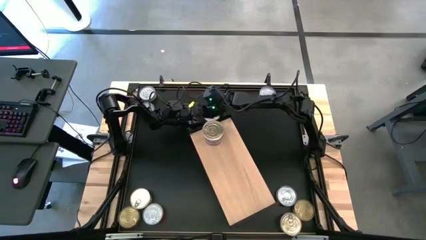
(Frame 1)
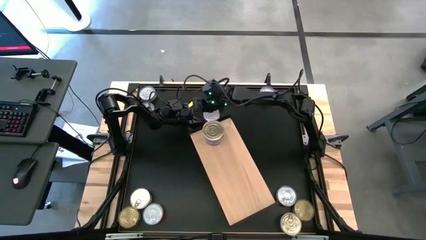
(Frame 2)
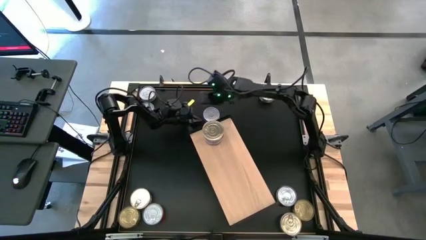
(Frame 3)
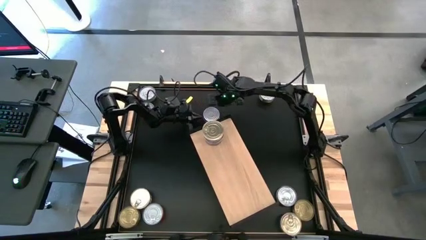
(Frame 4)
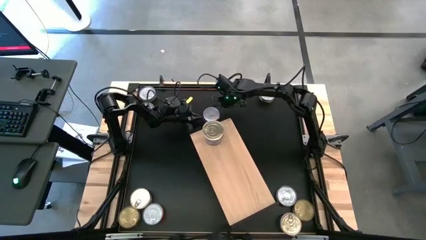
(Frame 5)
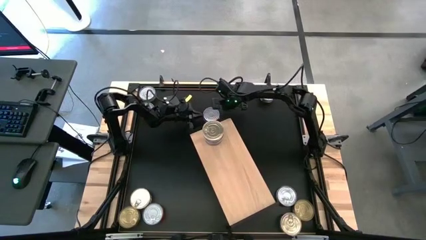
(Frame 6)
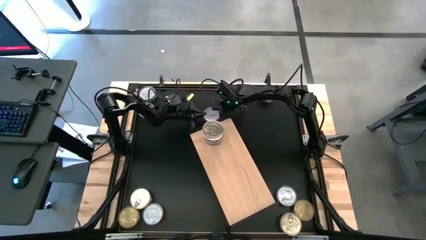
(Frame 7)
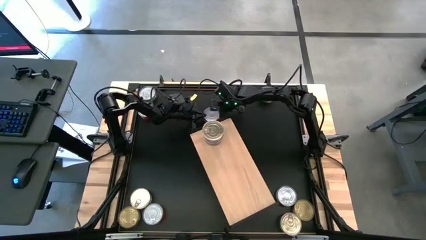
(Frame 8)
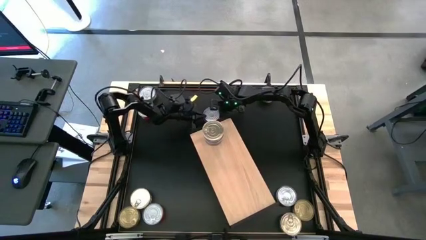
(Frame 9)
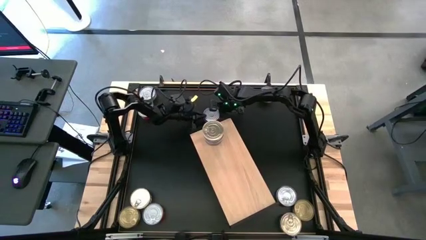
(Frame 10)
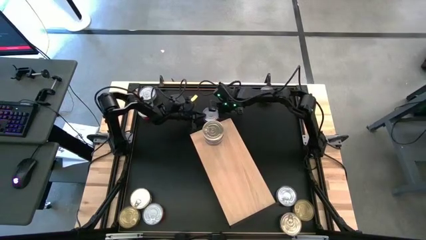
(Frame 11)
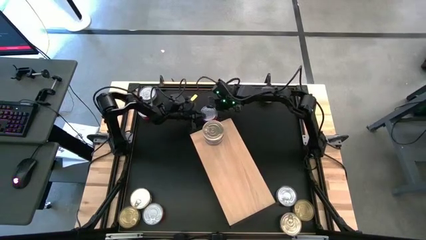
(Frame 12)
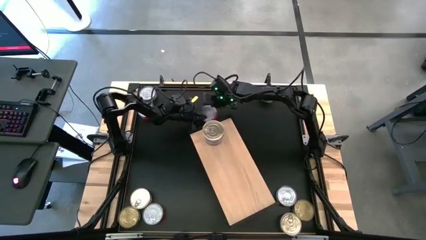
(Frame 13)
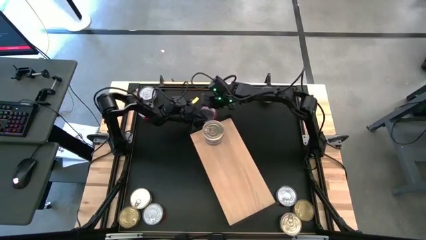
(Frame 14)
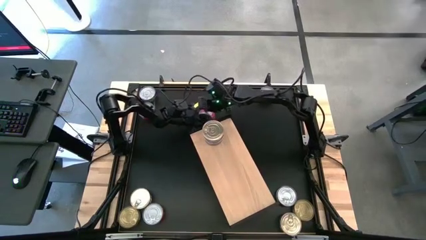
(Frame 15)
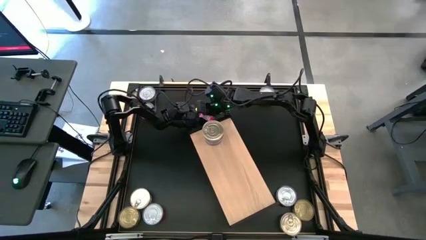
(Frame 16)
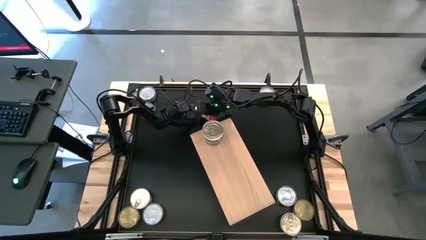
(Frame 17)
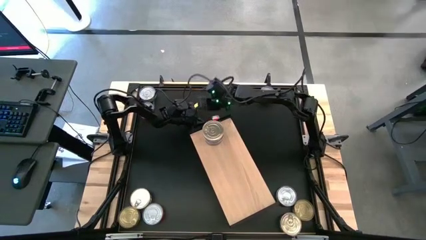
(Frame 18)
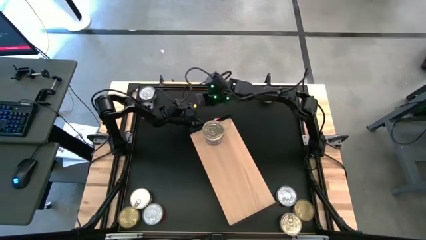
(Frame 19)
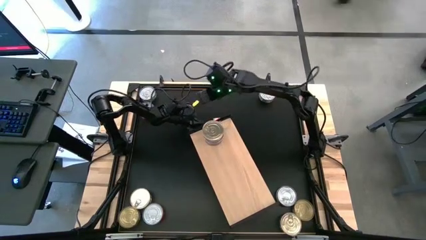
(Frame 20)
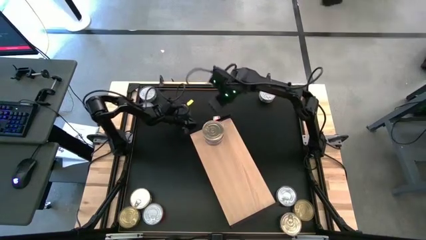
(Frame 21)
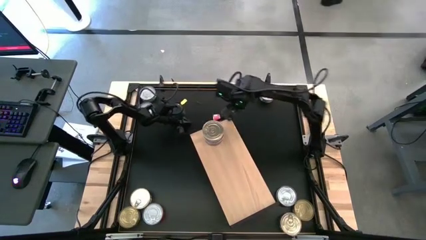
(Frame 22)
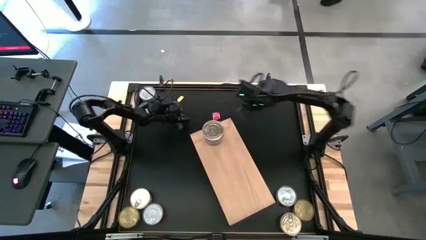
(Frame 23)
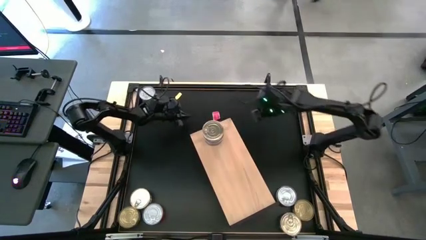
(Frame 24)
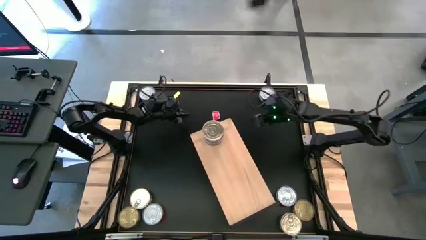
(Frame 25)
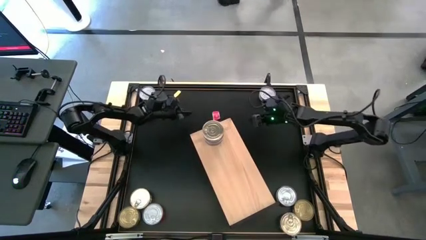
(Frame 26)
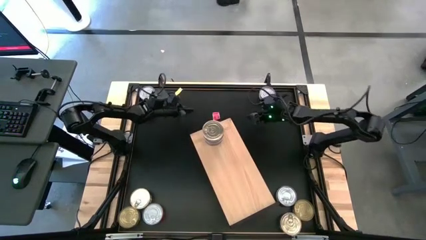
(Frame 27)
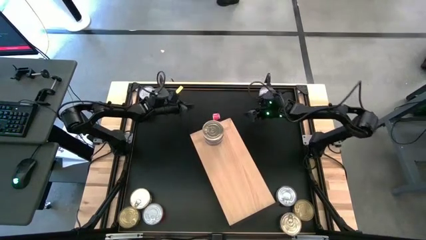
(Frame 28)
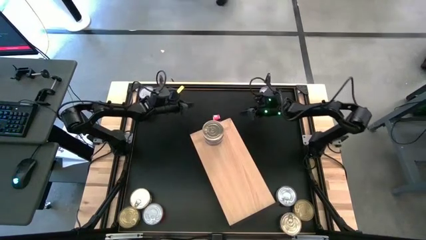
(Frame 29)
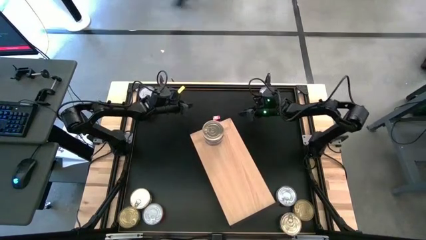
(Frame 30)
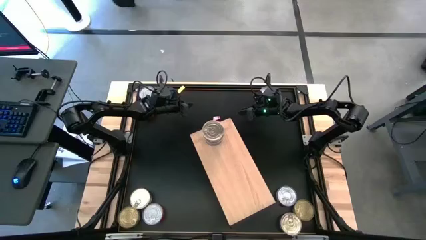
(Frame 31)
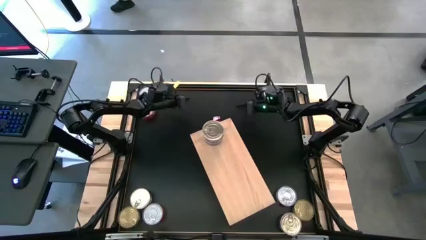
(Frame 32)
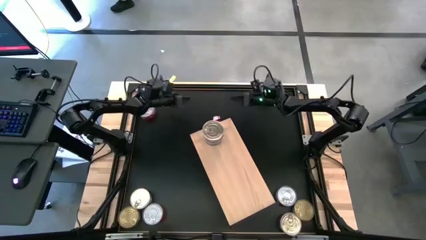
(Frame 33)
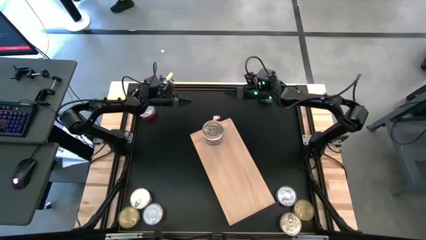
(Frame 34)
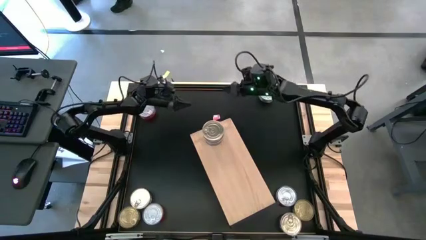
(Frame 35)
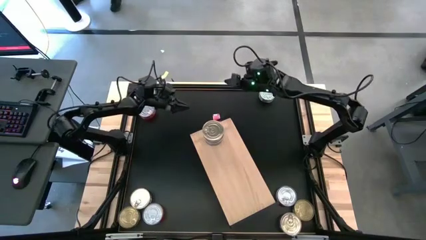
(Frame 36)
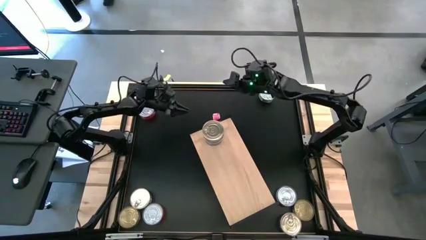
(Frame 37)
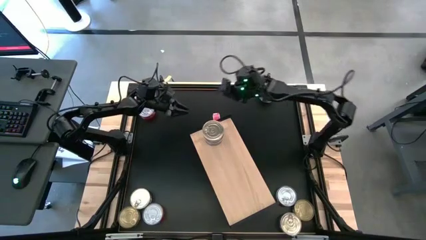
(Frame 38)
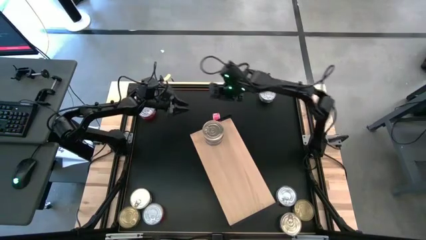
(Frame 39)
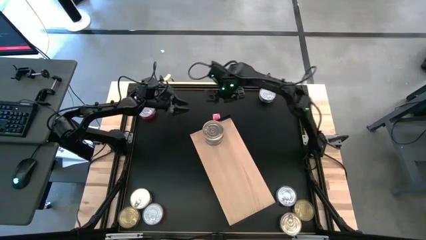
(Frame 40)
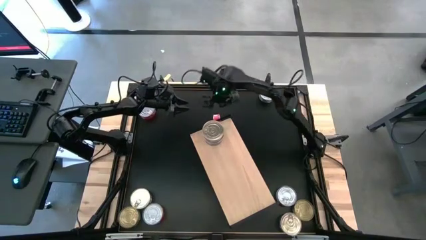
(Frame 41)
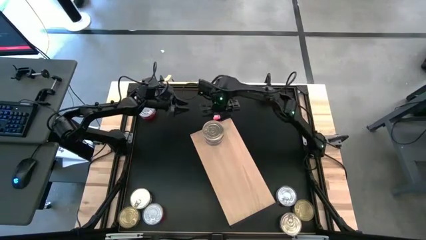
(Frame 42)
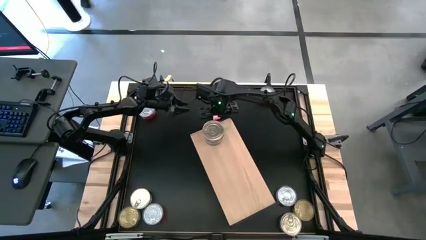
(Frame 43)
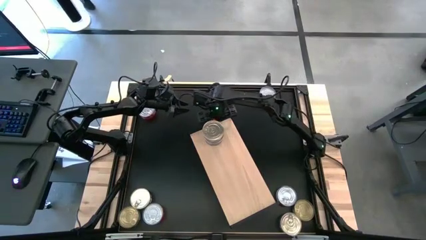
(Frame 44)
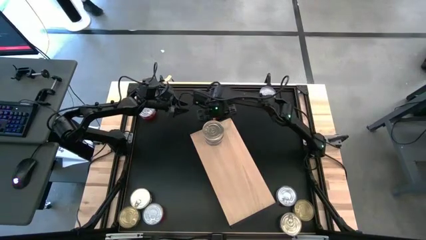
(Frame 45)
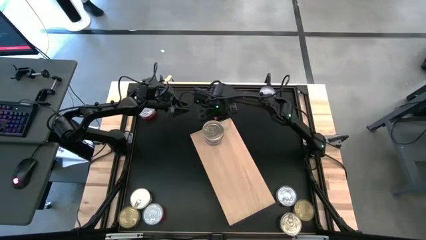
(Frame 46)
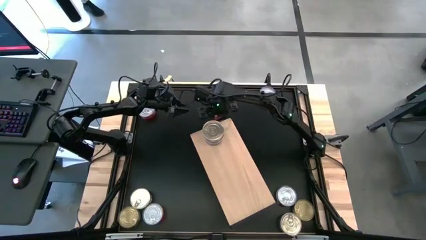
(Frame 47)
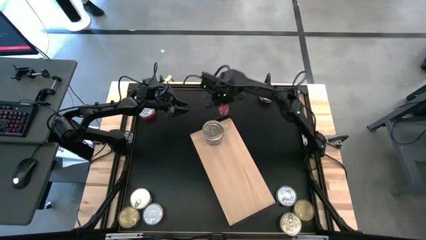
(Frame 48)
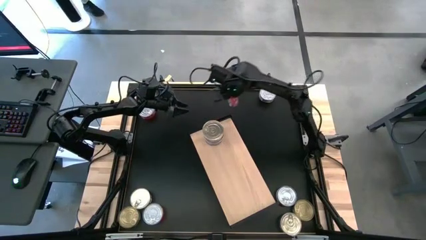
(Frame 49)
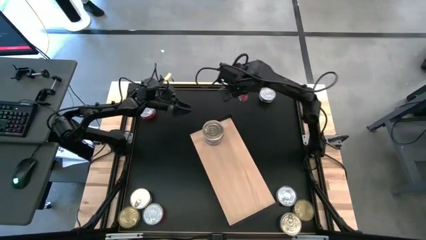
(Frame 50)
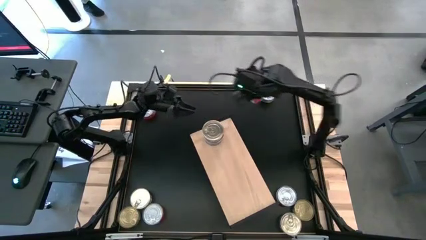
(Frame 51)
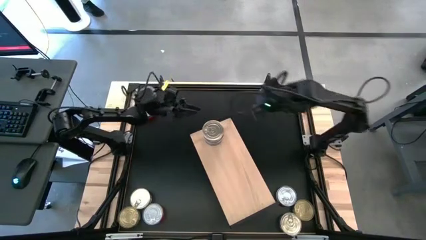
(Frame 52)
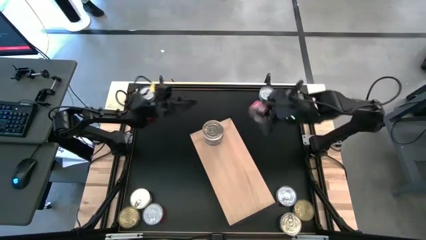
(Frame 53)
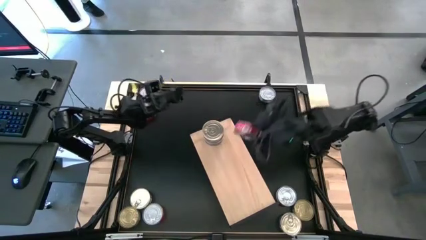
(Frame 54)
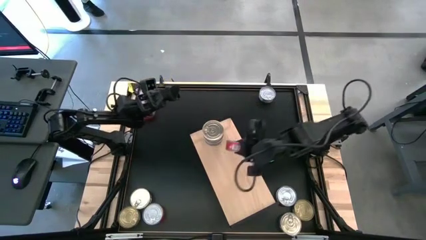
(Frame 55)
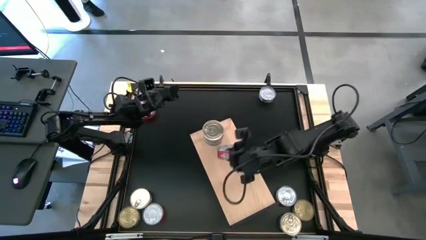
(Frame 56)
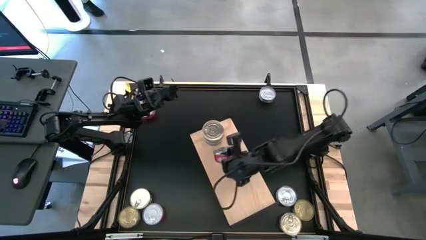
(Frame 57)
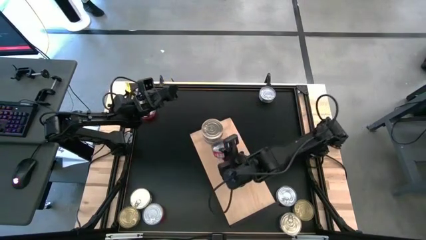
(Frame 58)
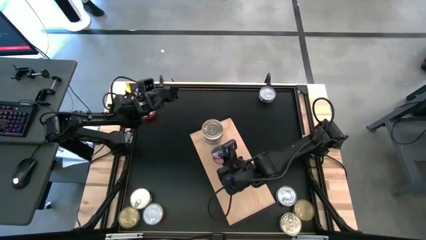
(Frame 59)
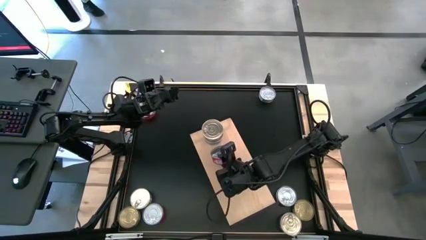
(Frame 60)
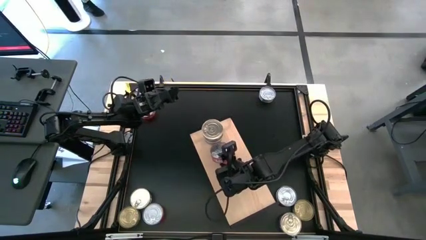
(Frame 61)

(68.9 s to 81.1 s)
Task: Stack canned seafood by type on shelf
Put the red tuna can on the shelf
